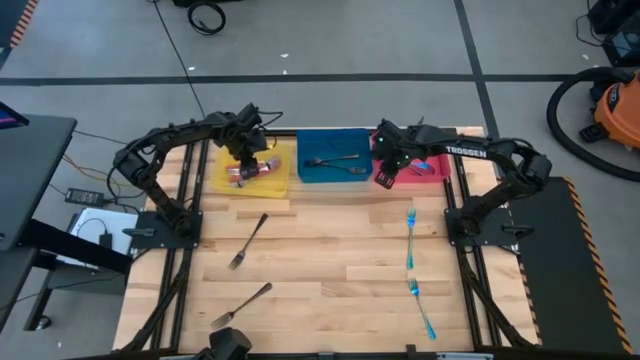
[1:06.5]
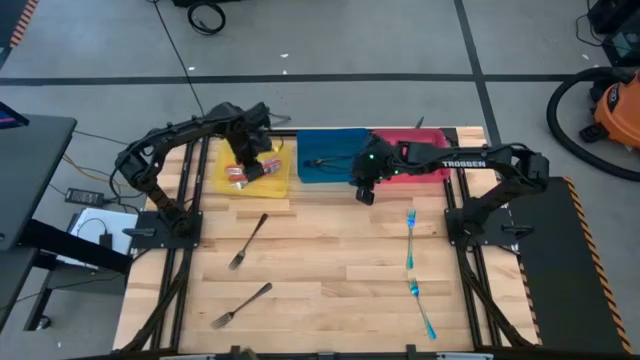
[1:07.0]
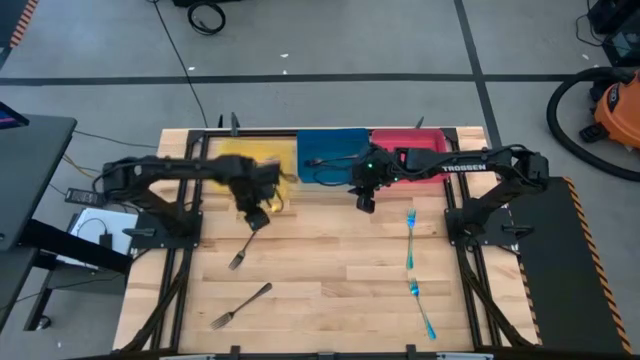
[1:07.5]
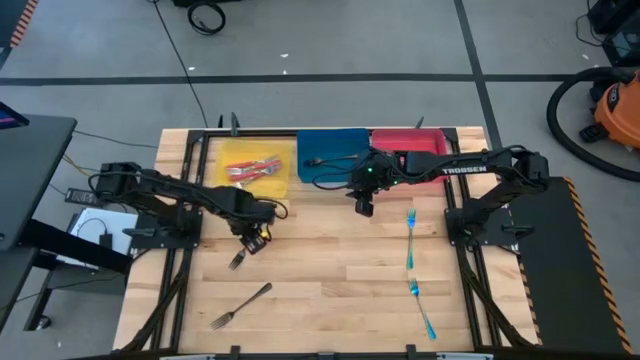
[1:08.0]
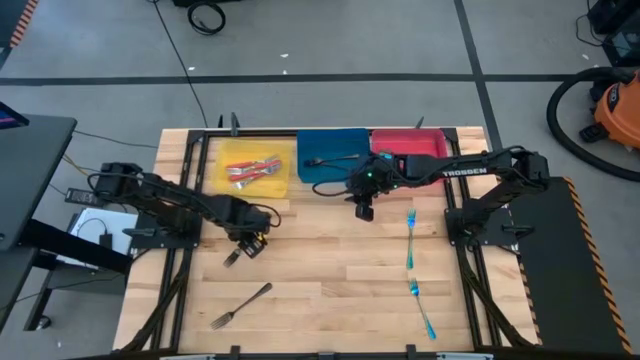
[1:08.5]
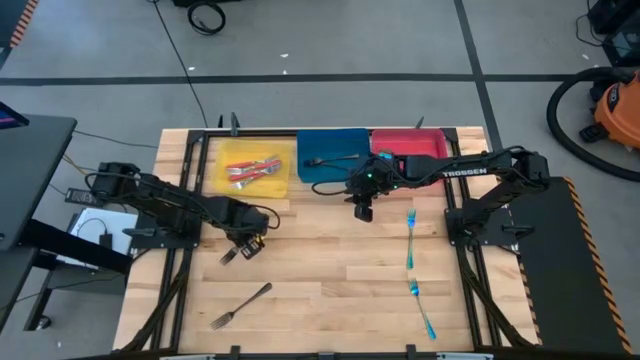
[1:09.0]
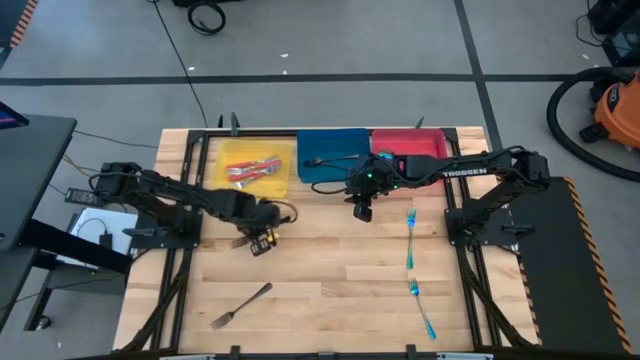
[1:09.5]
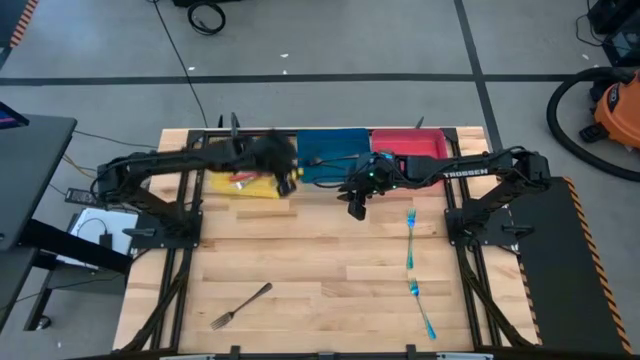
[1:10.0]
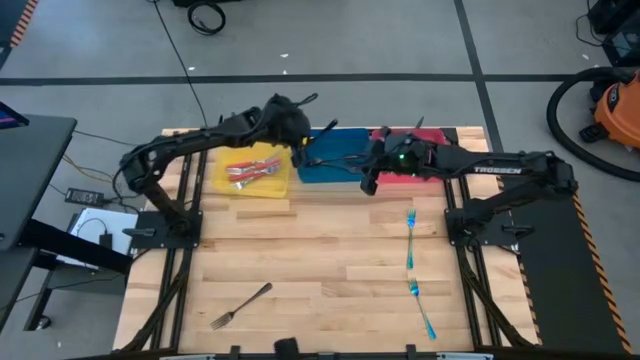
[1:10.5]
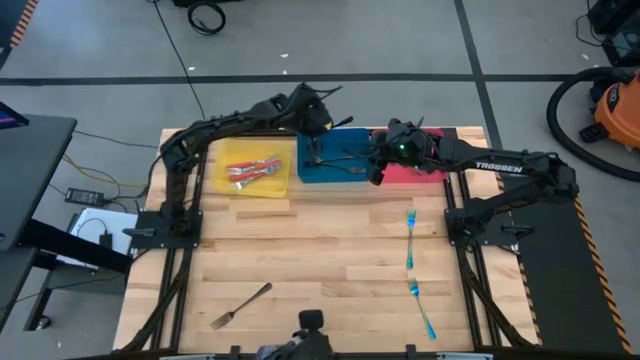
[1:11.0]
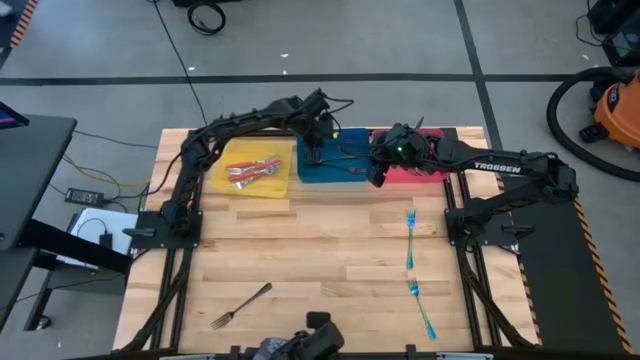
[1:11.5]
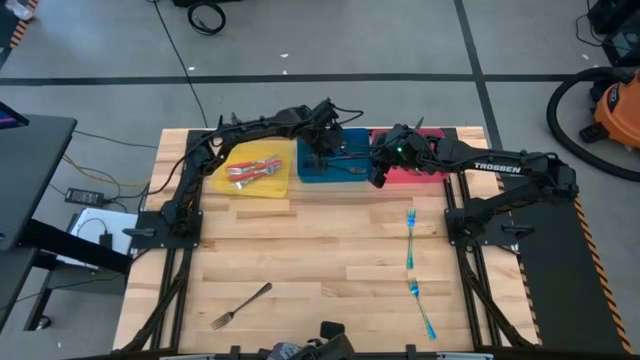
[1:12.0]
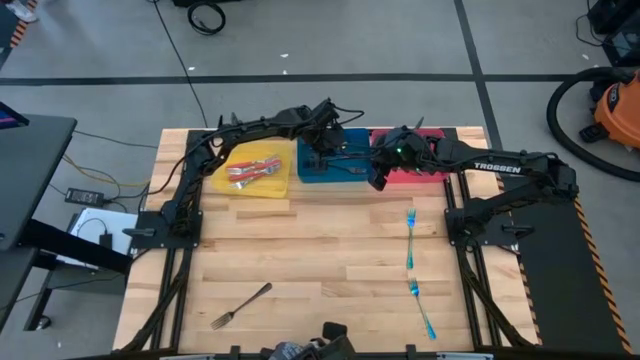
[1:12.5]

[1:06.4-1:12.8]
Task: Sort silverware by color (type)
Put the top black fork into the blue bin

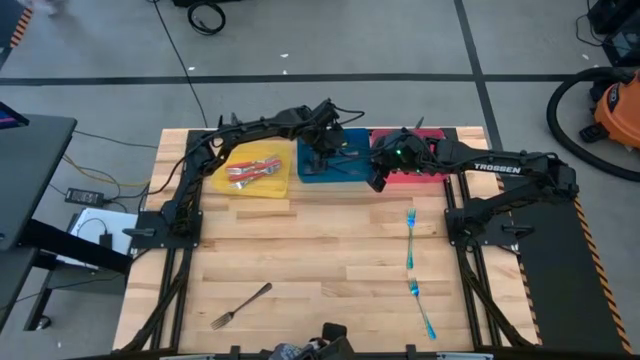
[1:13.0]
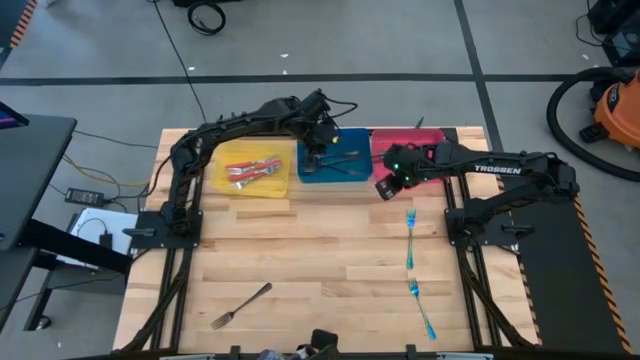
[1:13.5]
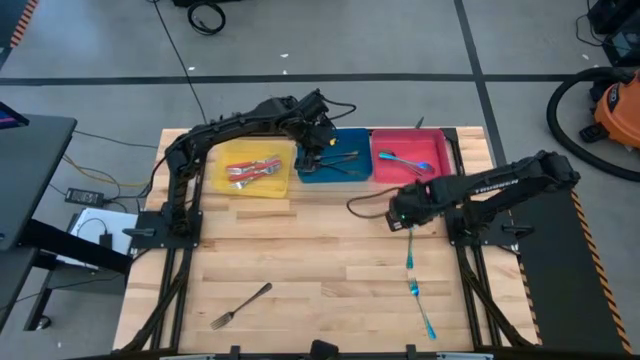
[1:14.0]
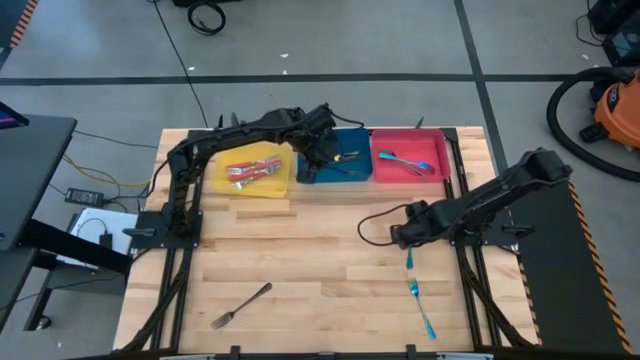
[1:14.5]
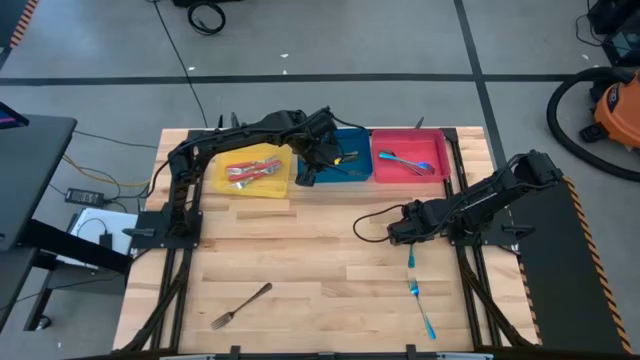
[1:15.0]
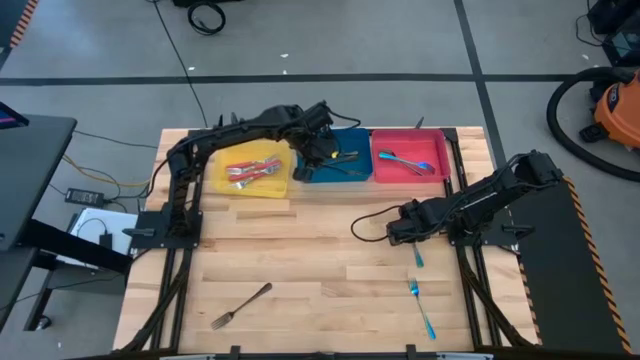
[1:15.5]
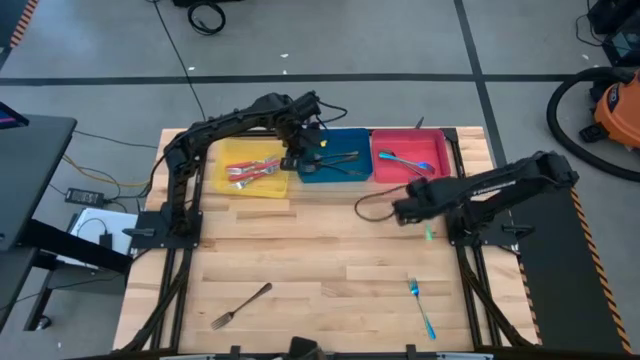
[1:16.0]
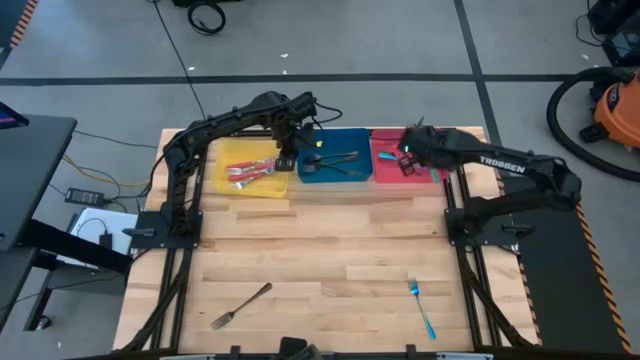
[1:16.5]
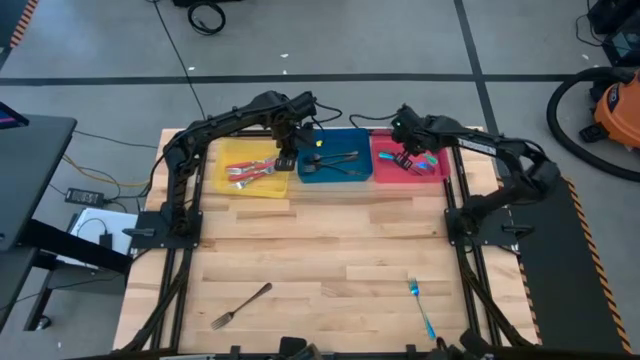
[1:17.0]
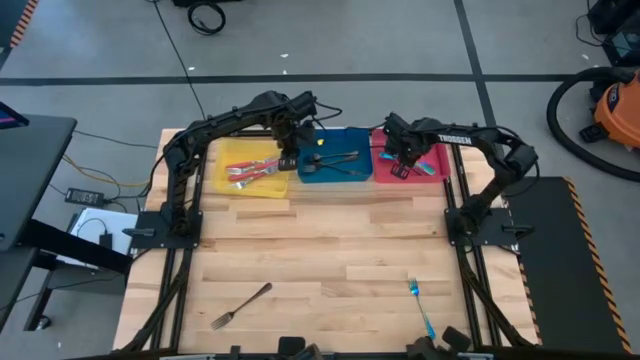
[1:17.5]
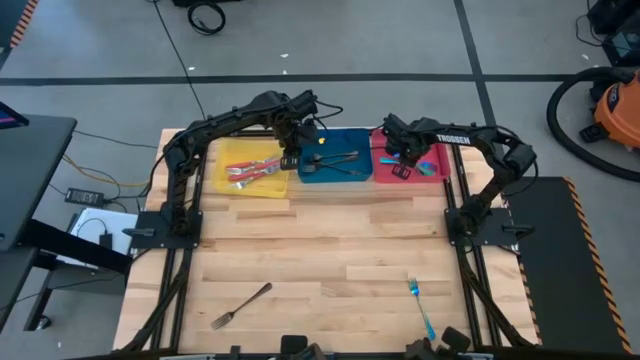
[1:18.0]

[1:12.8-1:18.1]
Put the top right blue fork into the pink bin

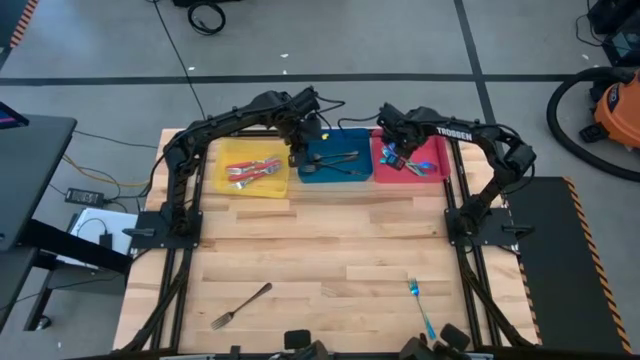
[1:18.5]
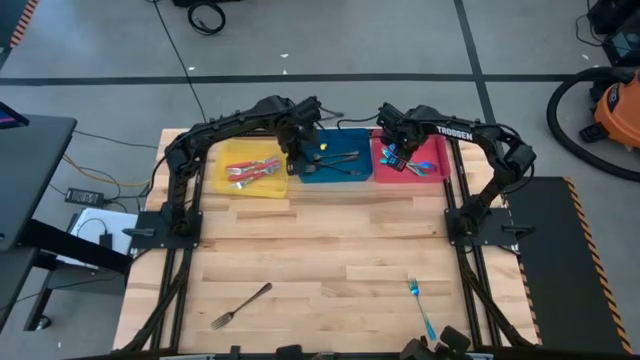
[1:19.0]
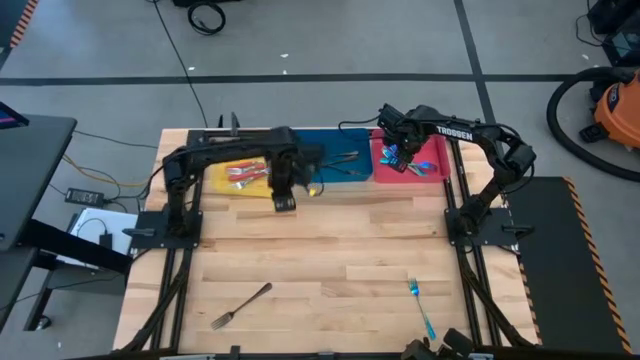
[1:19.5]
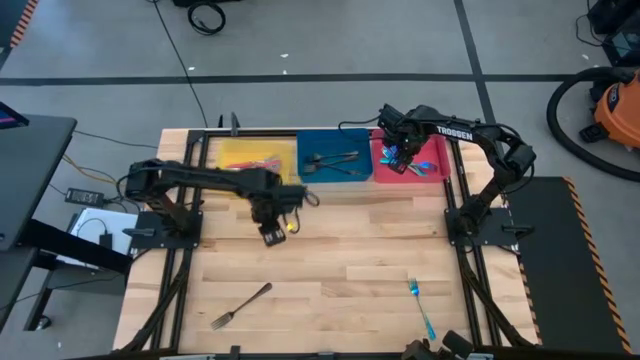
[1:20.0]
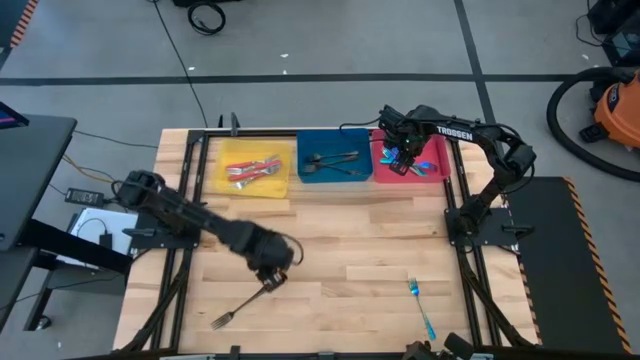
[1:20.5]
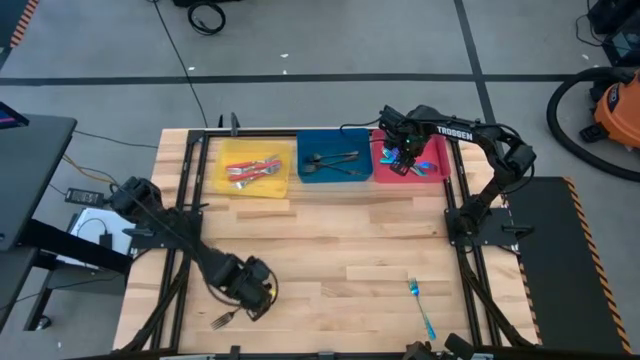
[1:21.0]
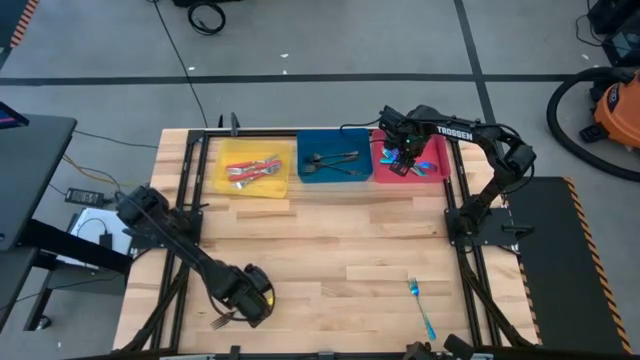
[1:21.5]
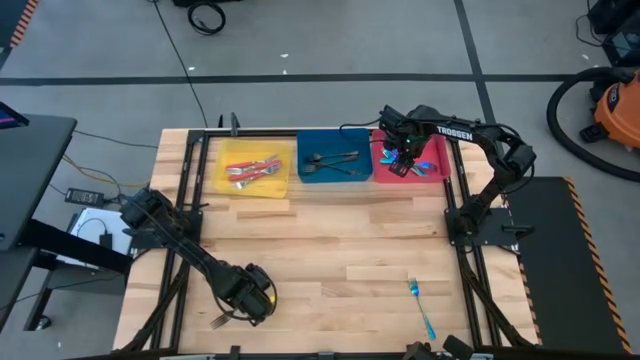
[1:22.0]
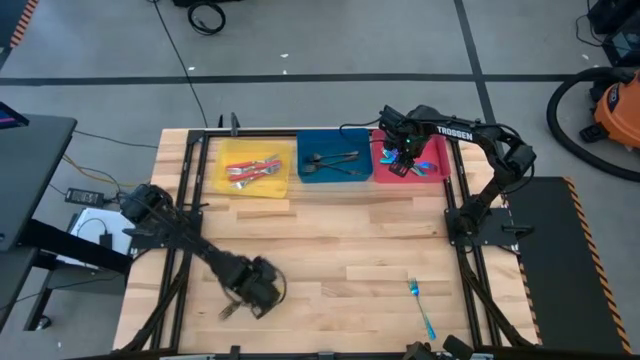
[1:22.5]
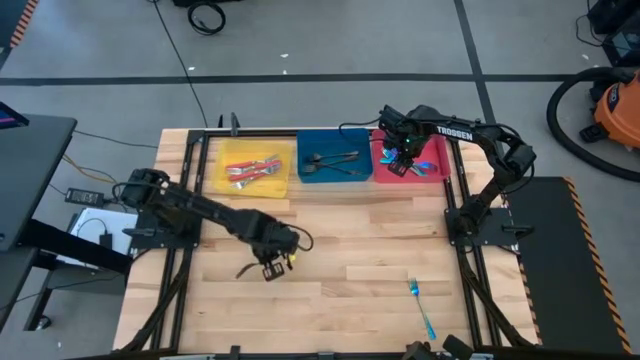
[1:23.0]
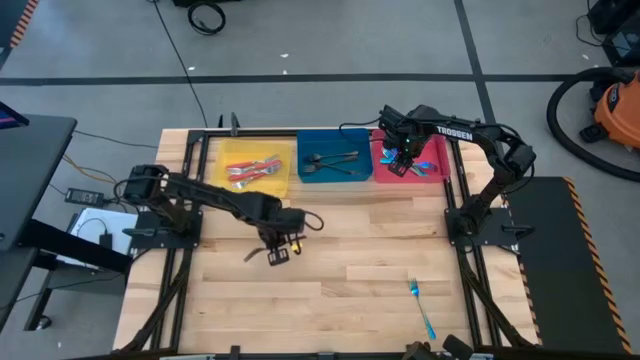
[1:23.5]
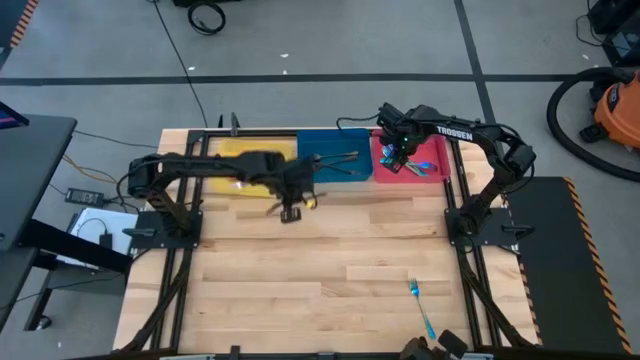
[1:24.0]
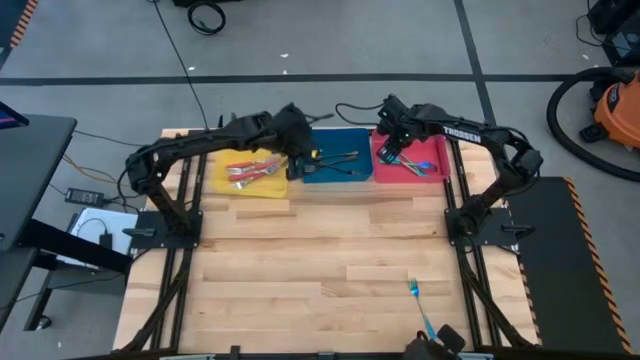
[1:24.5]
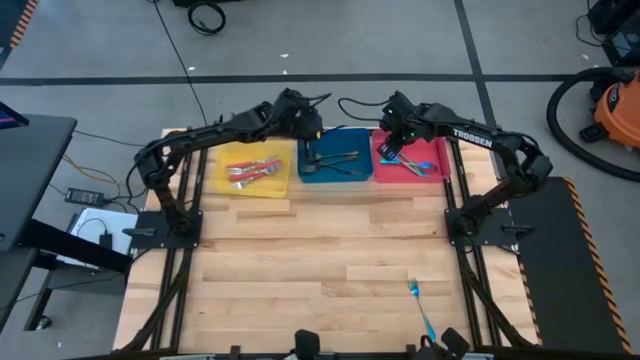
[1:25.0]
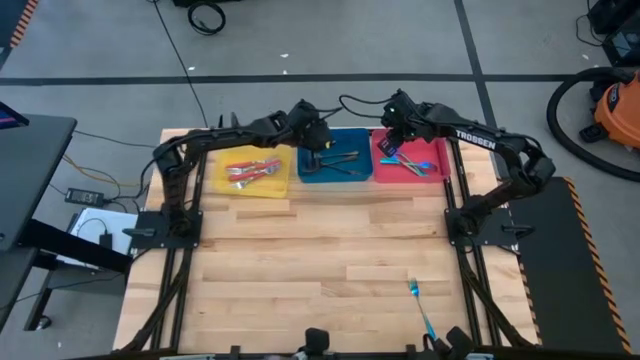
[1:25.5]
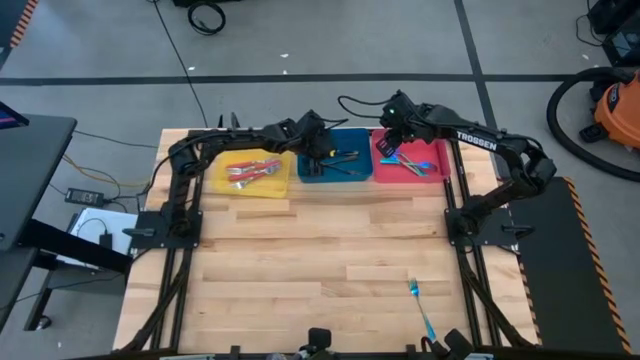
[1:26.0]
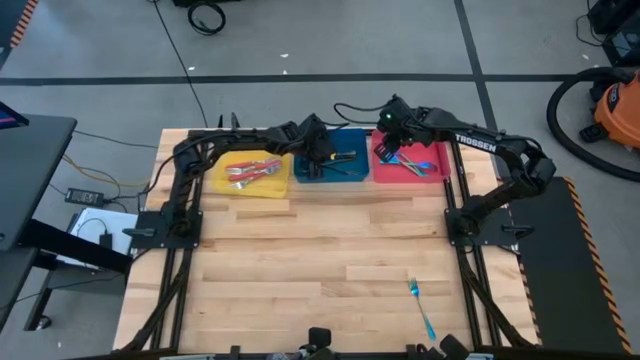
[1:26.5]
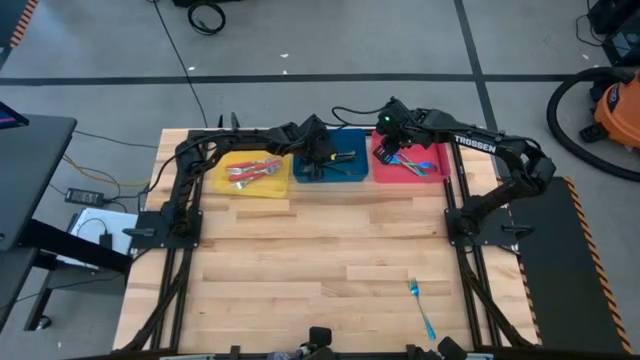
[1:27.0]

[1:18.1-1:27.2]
Put the black fork into the blue bin
